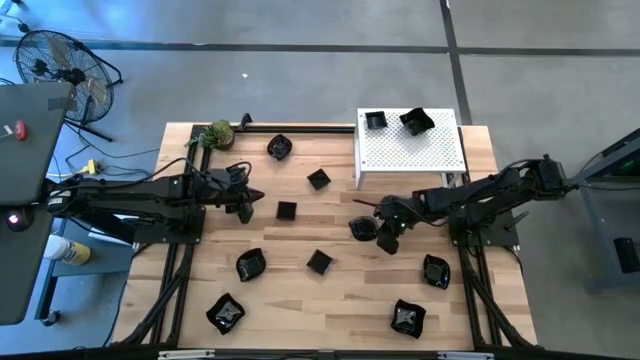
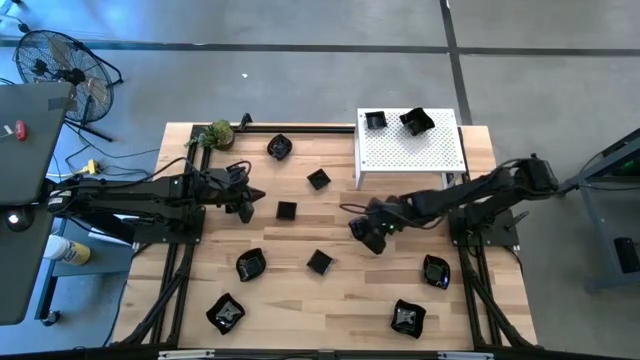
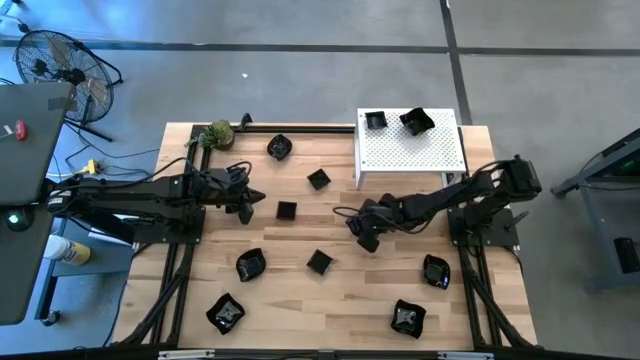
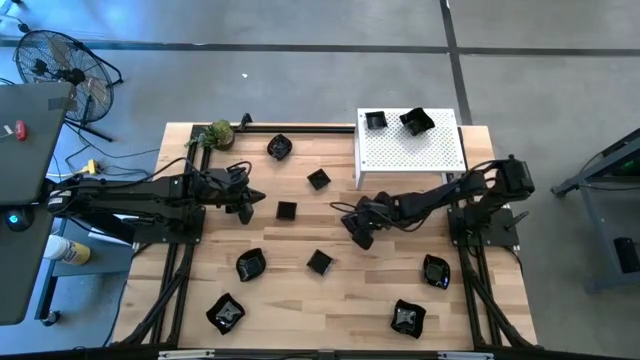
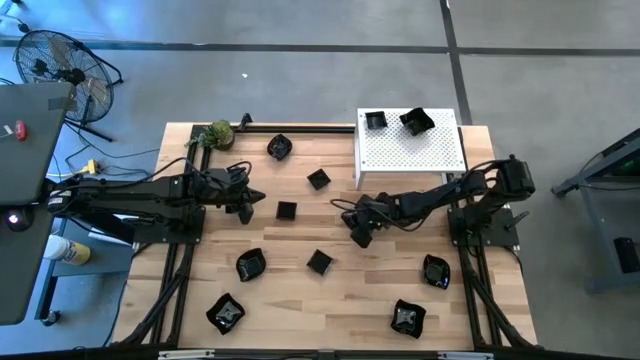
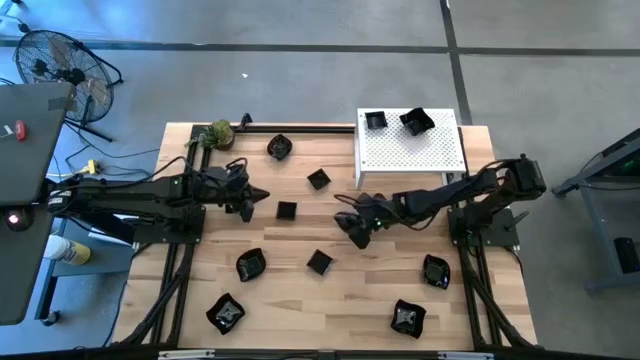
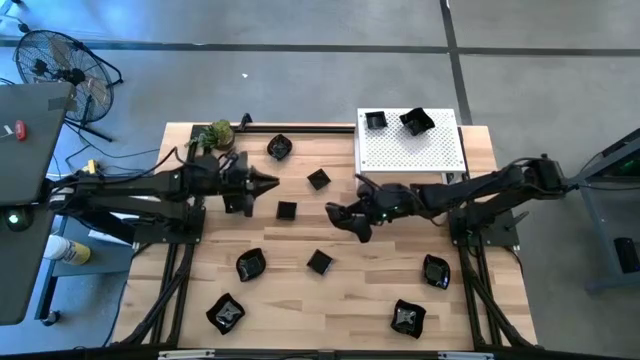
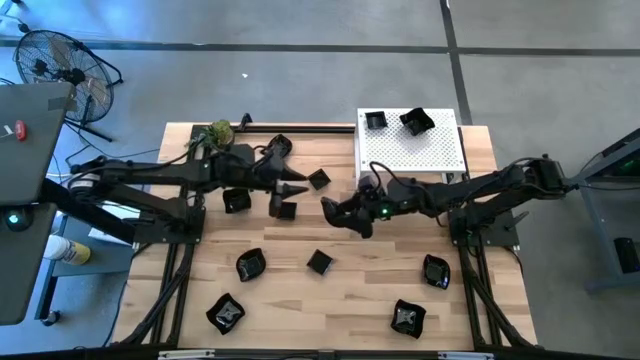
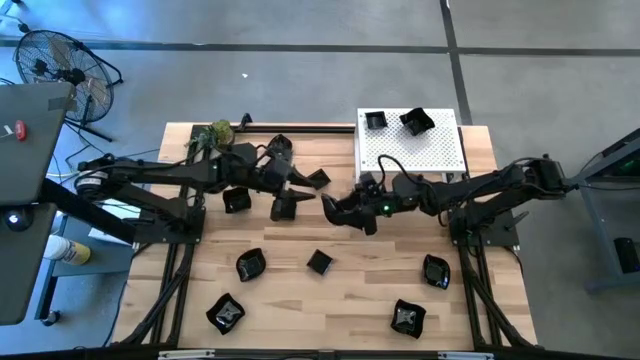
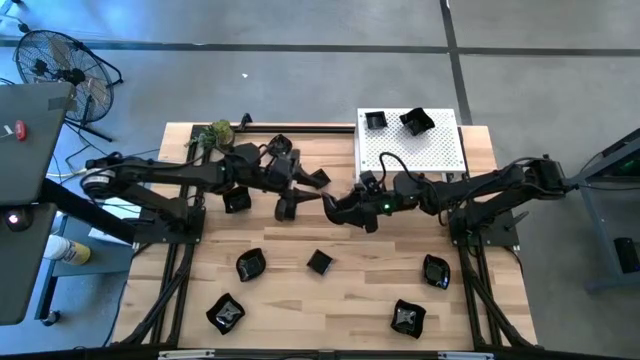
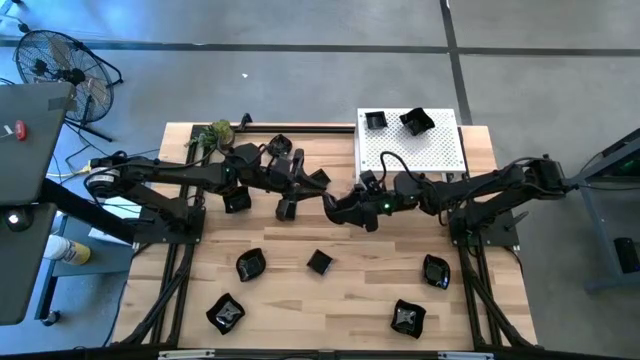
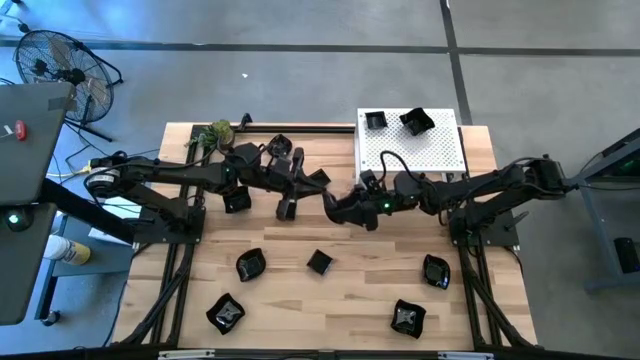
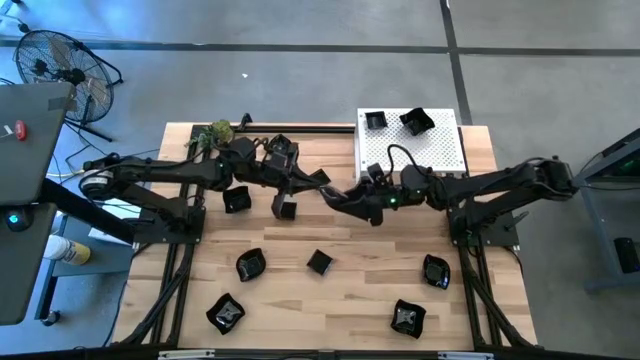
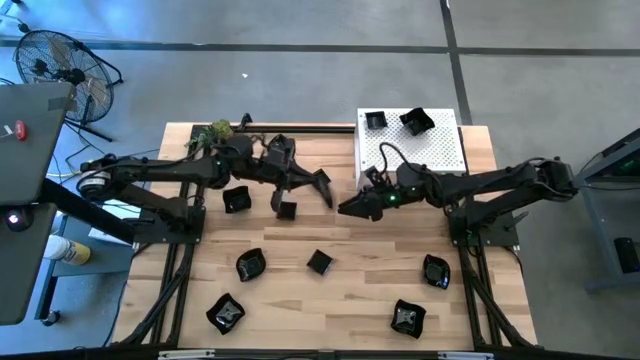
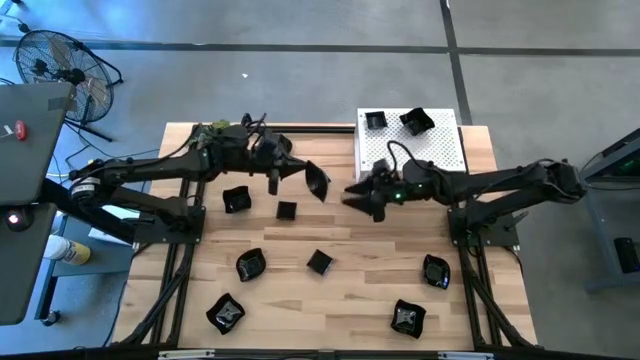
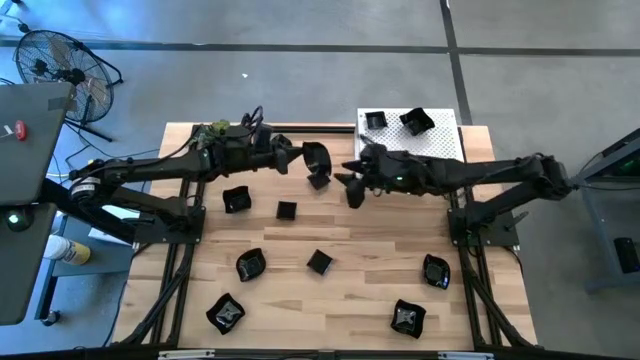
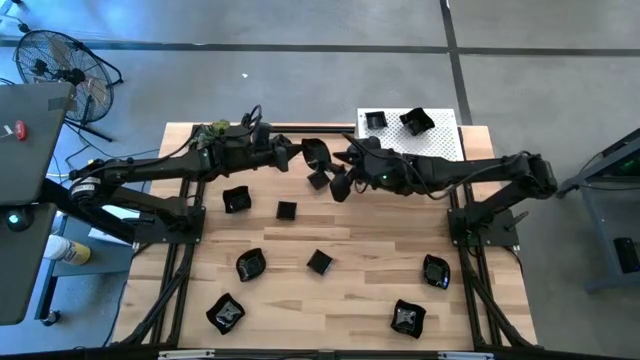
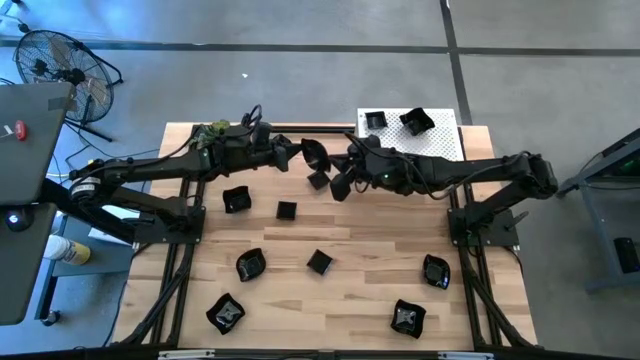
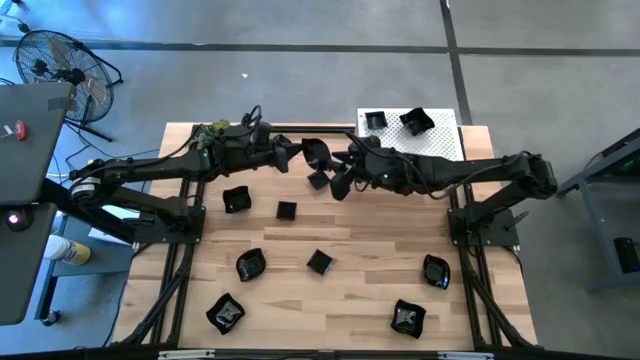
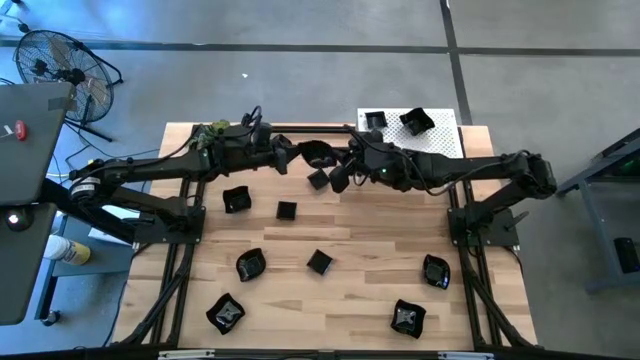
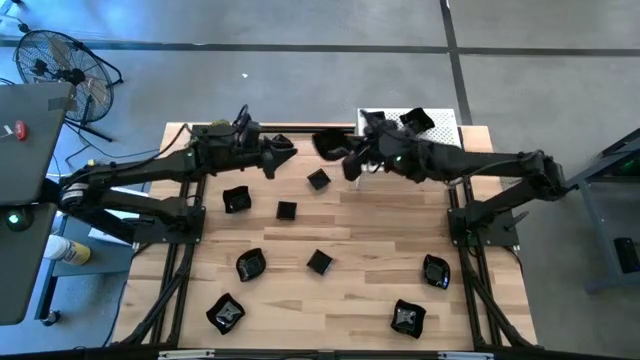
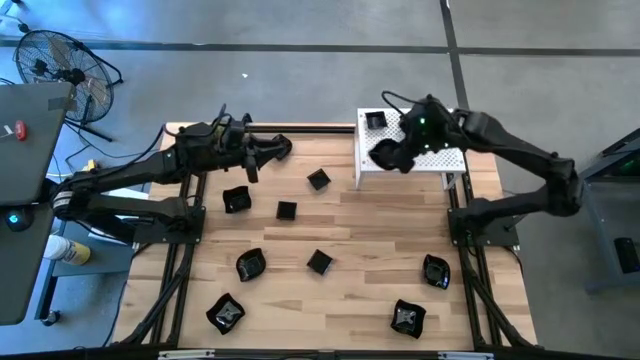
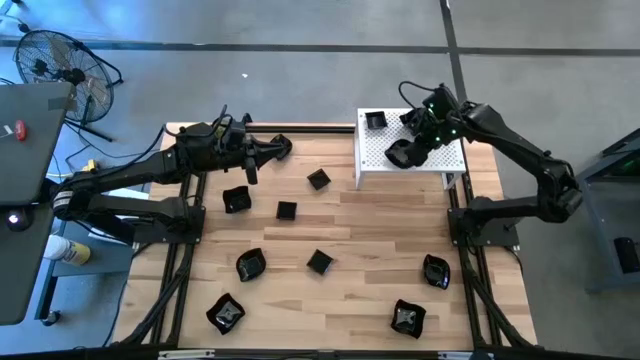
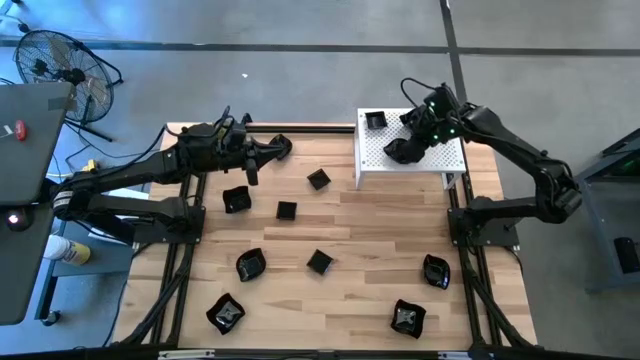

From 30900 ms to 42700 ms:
Task: Pick & Place Mini shaped plates
Put the leaf-shaped plate on the shelf

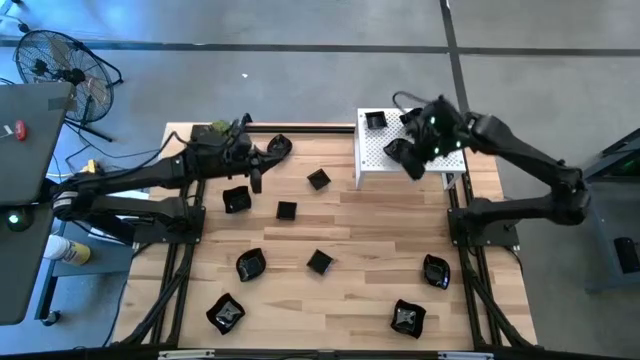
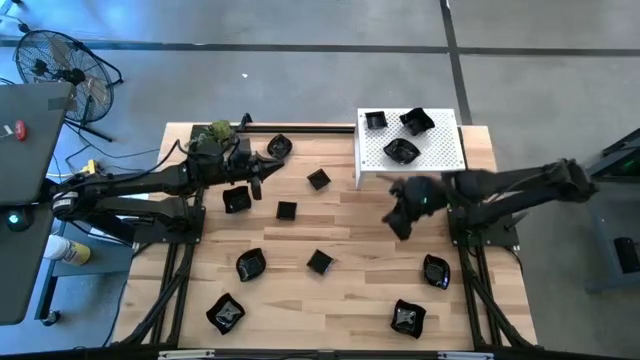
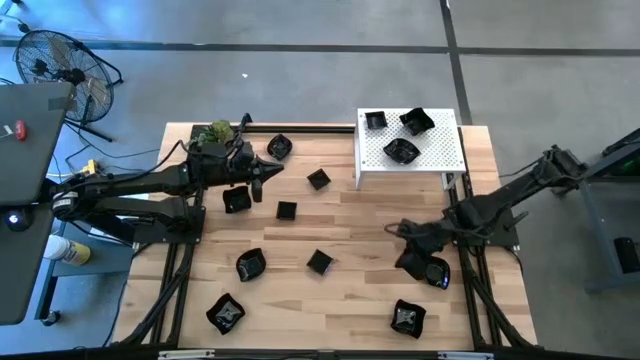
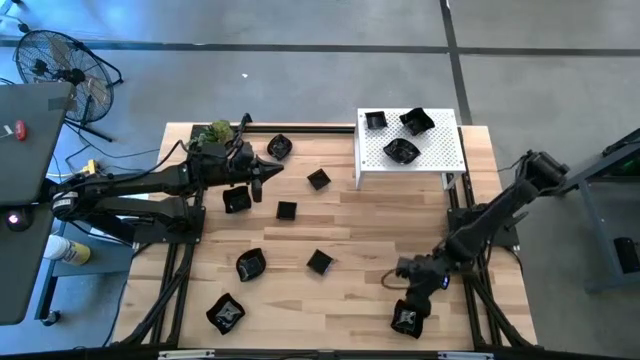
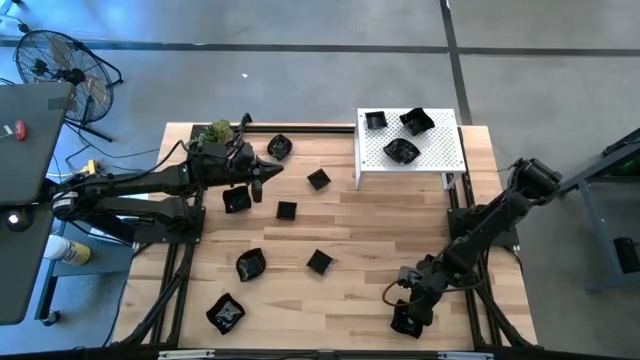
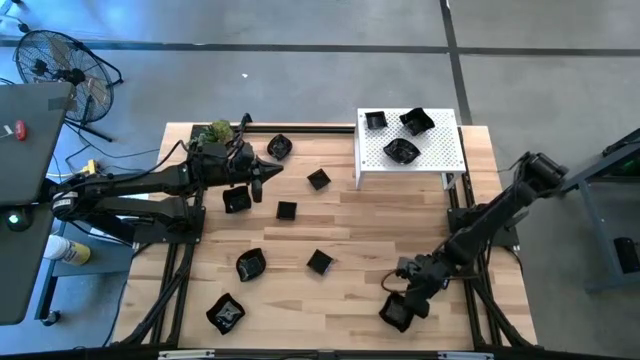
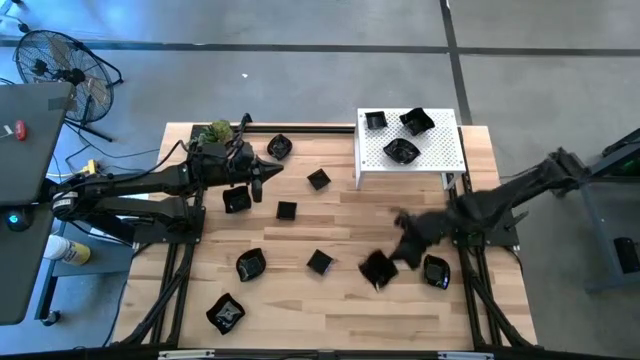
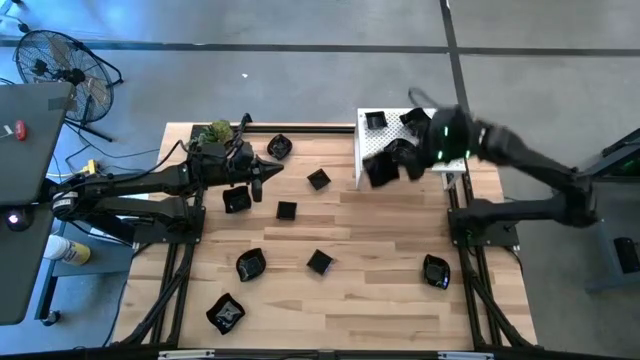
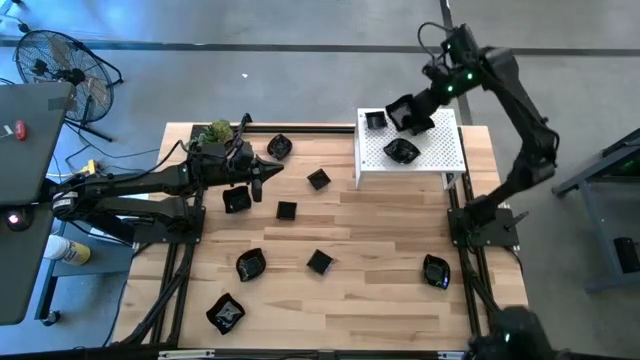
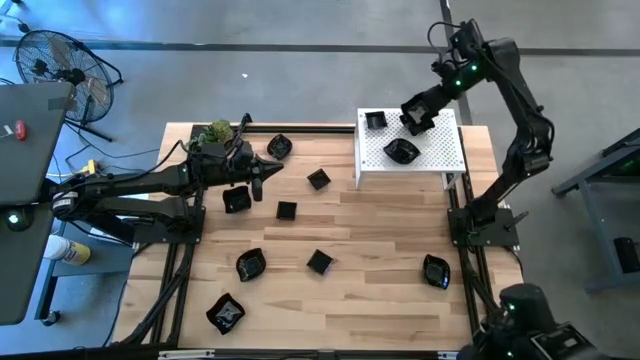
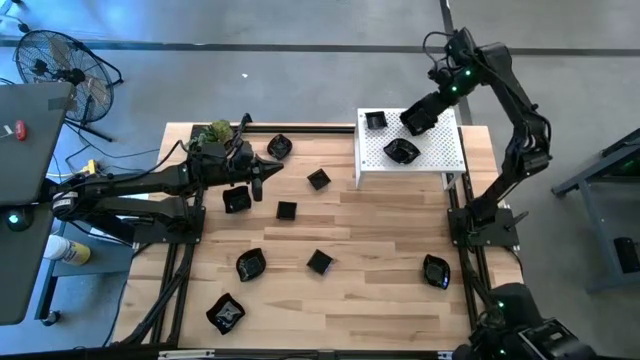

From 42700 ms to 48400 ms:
Stack the distorted square plate on top of the distorted square plate on the shelf

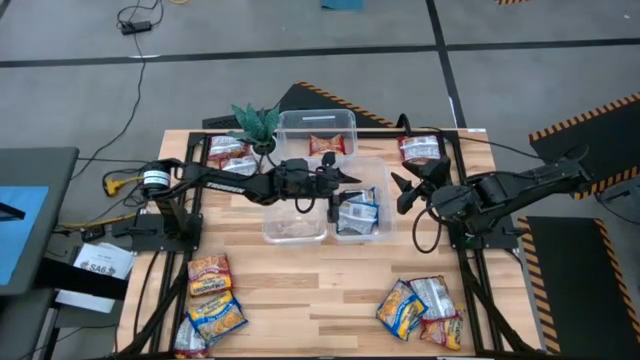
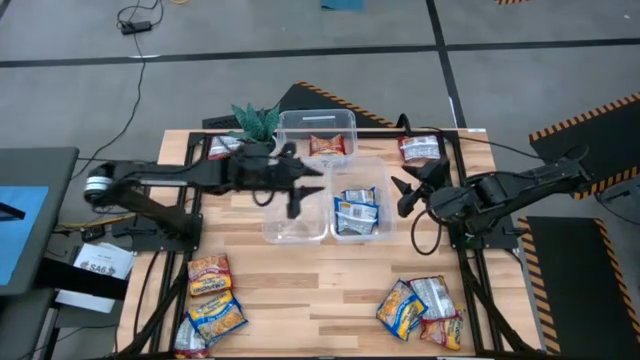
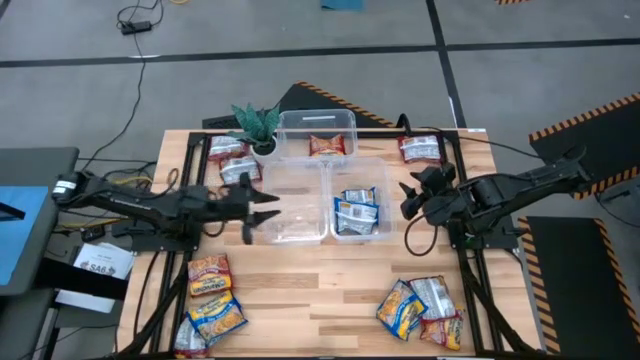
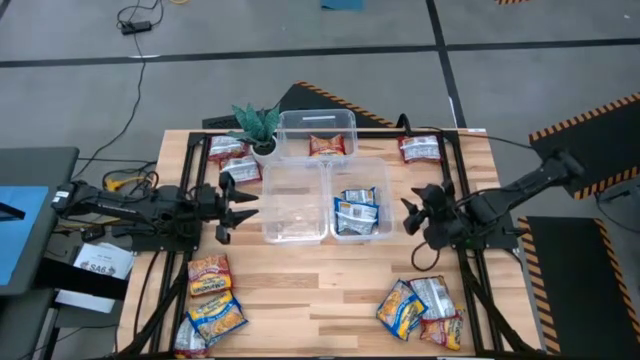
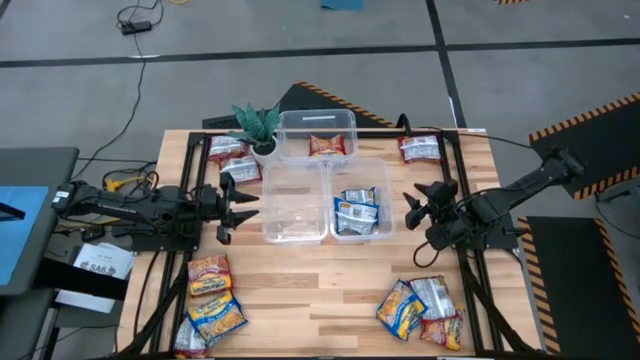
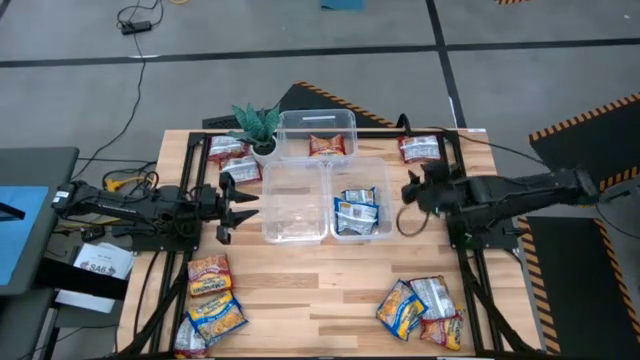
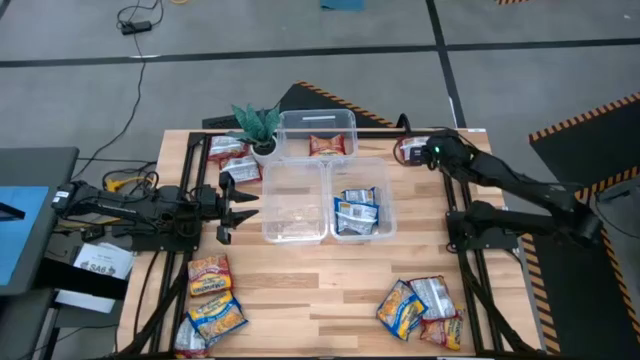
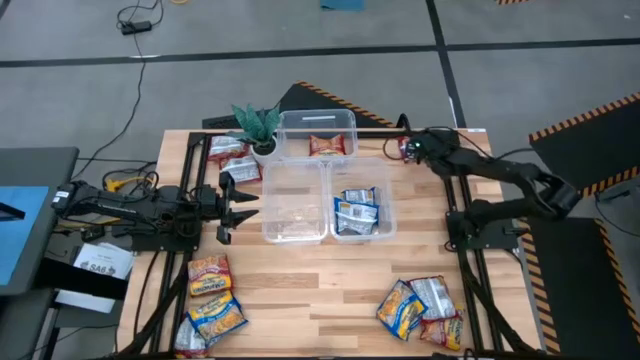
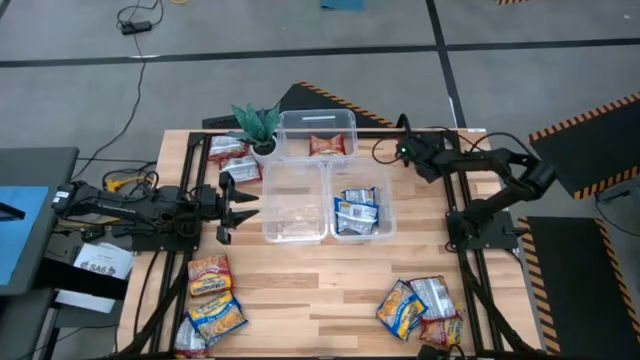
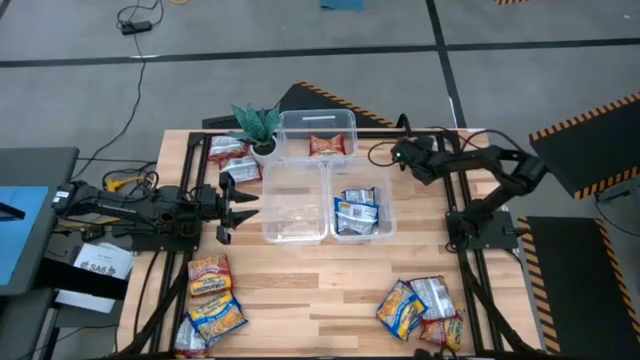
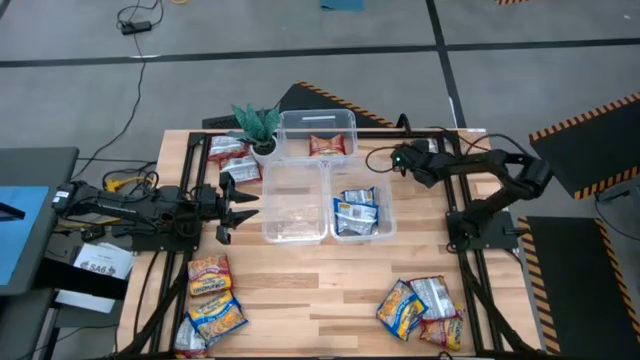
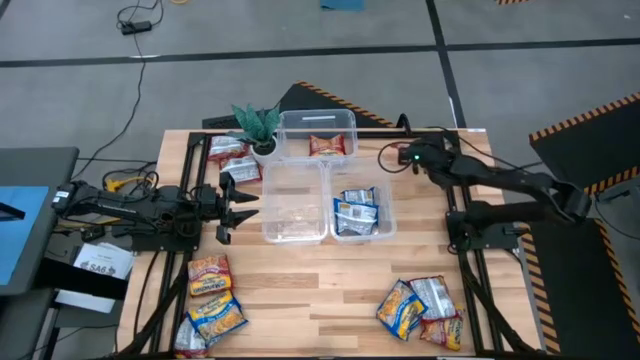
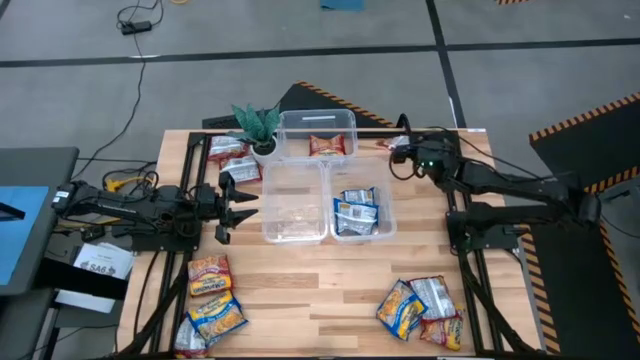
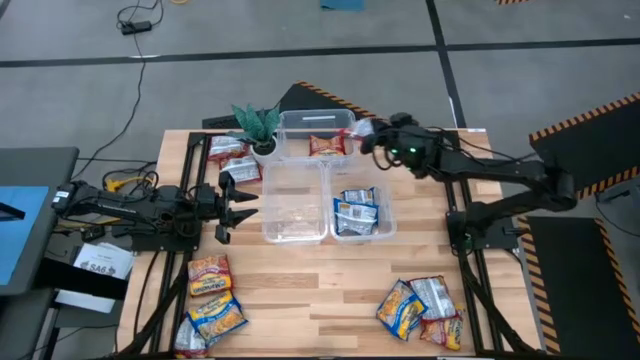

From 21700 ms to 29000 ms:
Task: Sort Maruchan noodles
Put the red noodle pack into the top transparent bin
